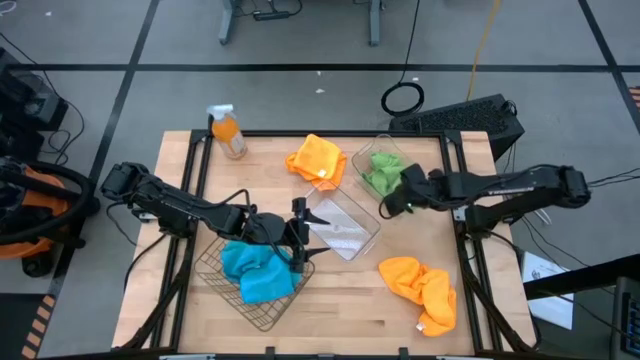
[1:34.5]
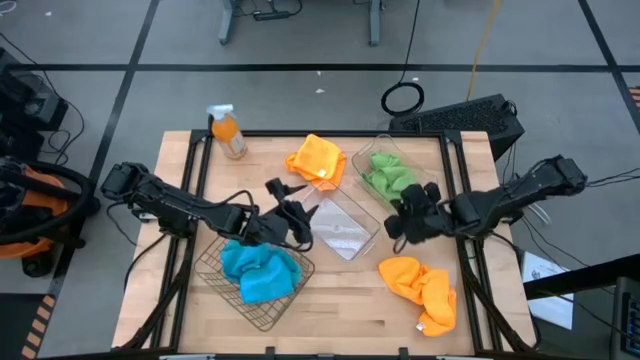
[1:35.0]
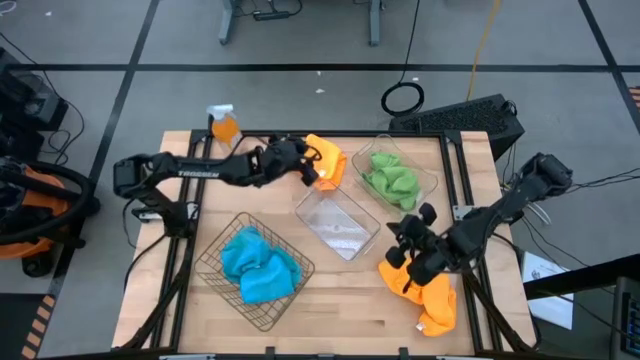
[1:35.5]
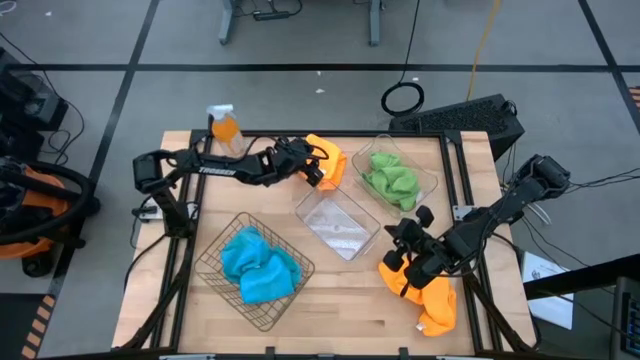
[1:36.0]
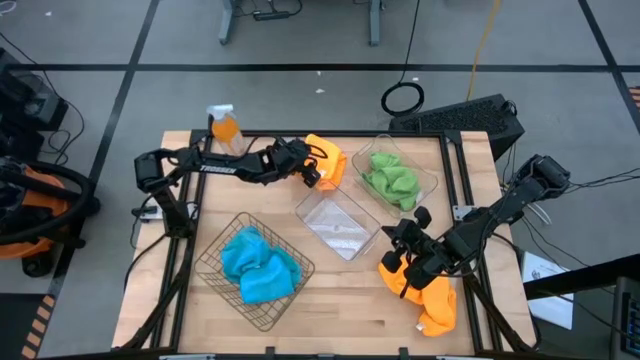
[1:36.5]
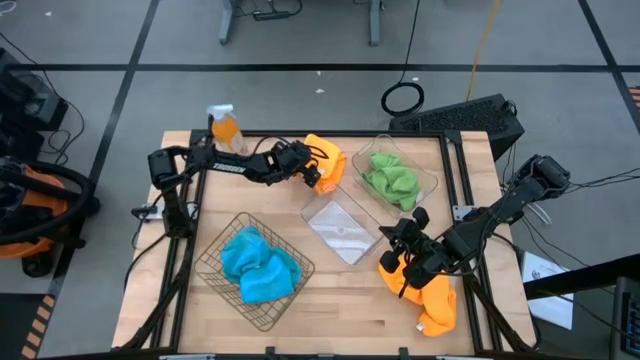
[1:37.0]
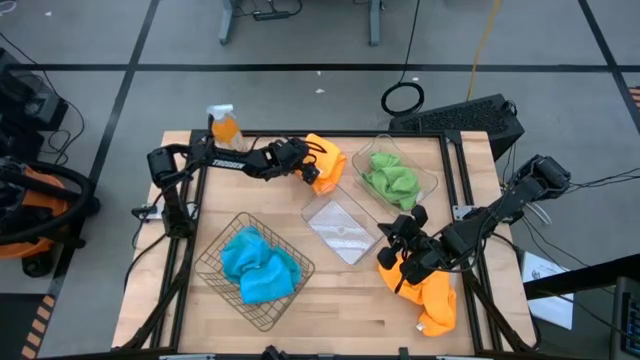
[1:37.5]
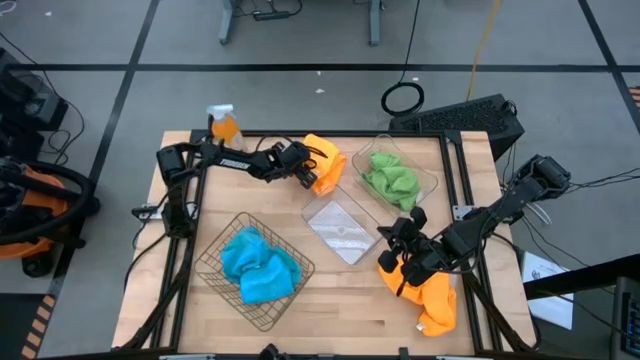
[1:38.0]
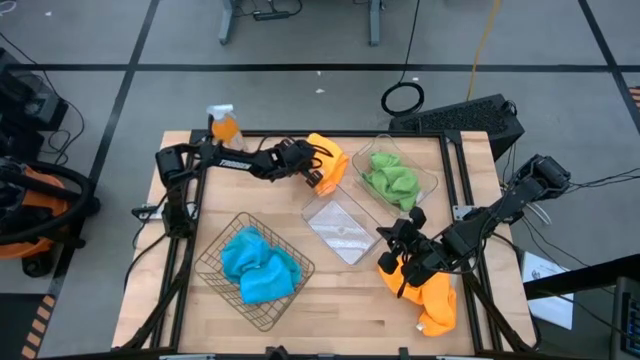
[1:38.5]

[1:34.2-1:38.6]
Task: Sort microfiber towel by color & place in baskets
Put the top orange microfiber towel into the bottom transparent bin

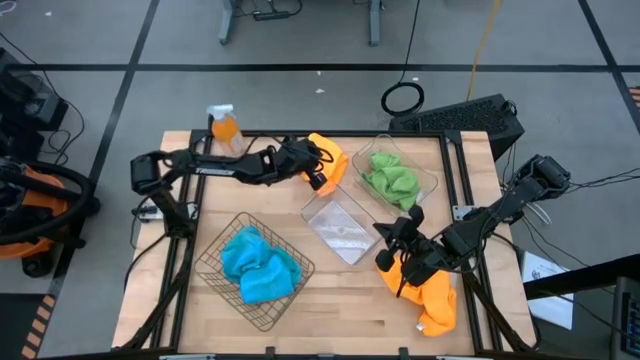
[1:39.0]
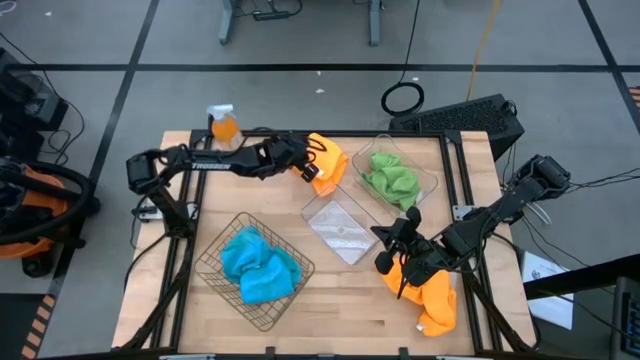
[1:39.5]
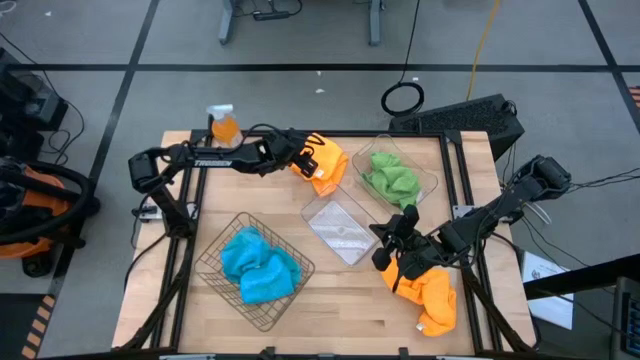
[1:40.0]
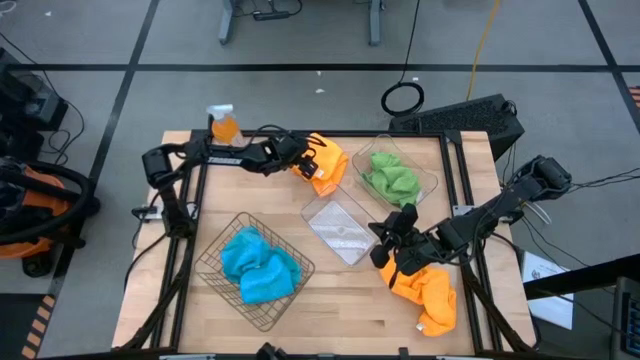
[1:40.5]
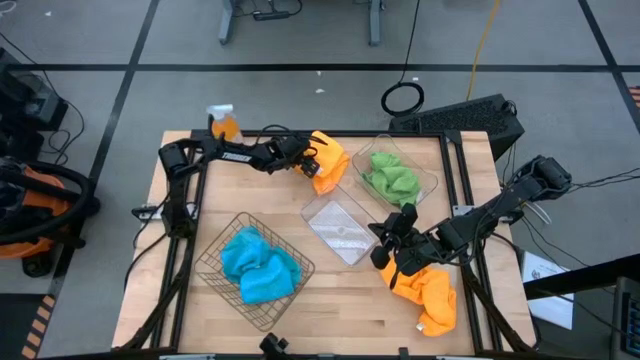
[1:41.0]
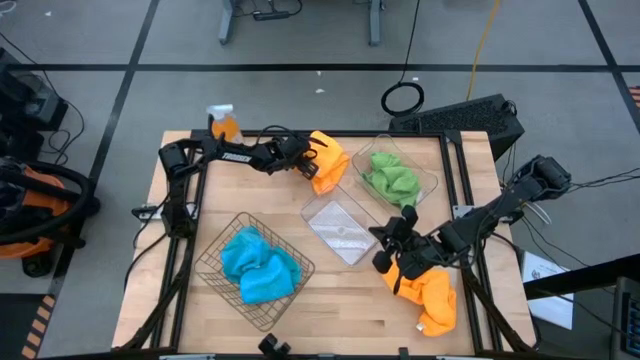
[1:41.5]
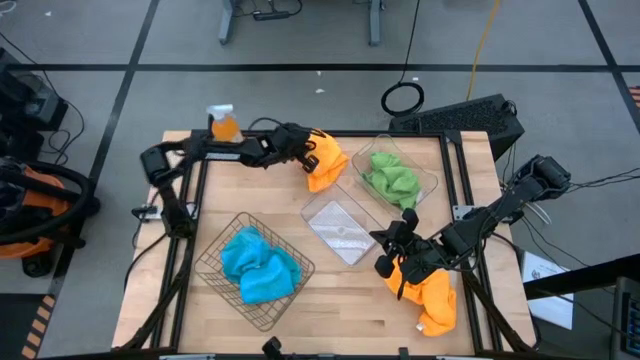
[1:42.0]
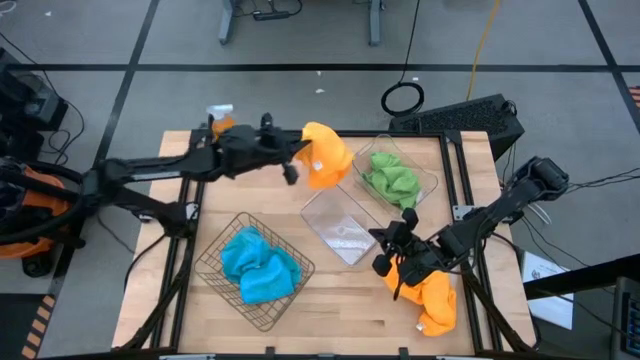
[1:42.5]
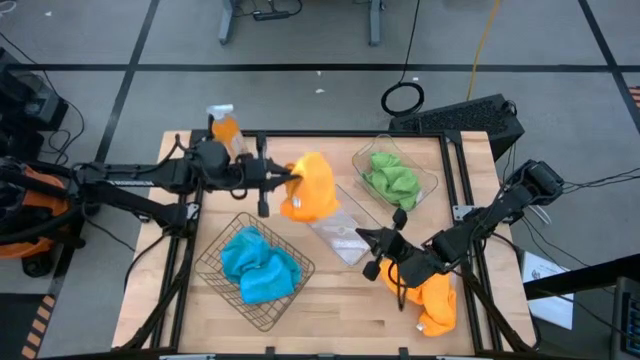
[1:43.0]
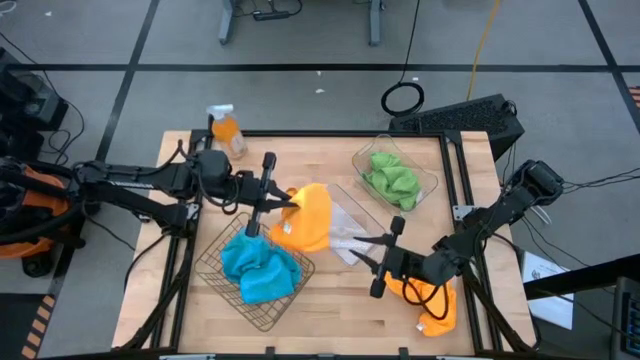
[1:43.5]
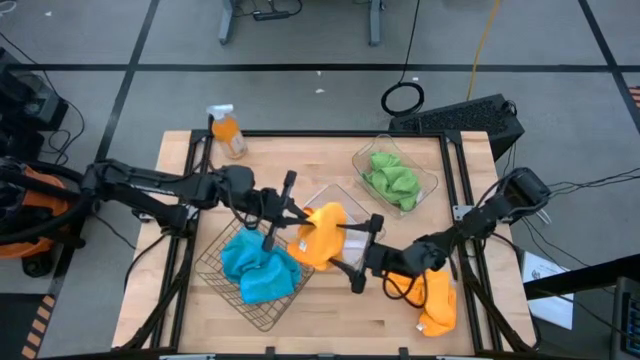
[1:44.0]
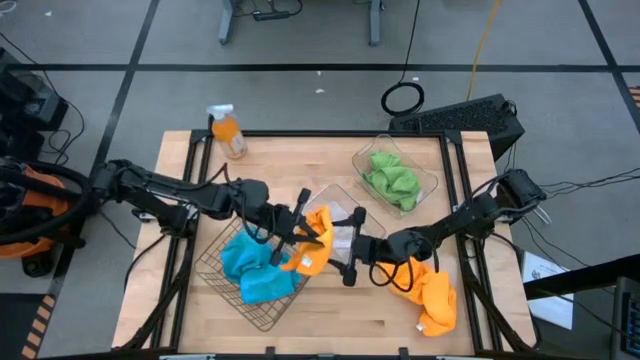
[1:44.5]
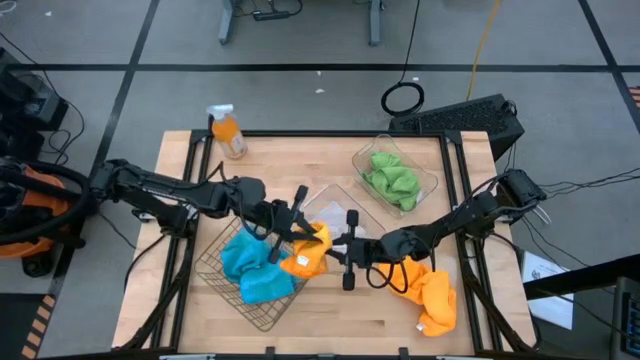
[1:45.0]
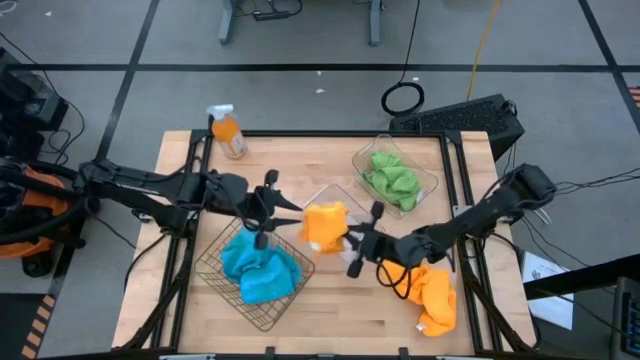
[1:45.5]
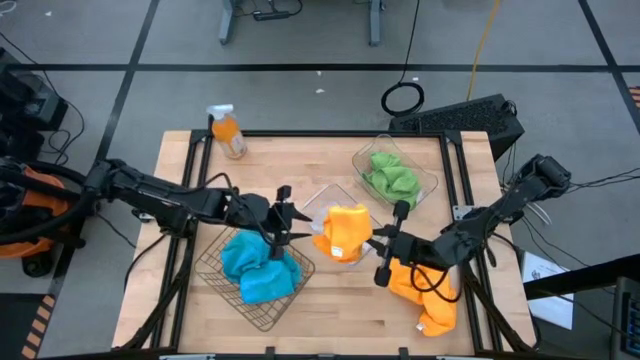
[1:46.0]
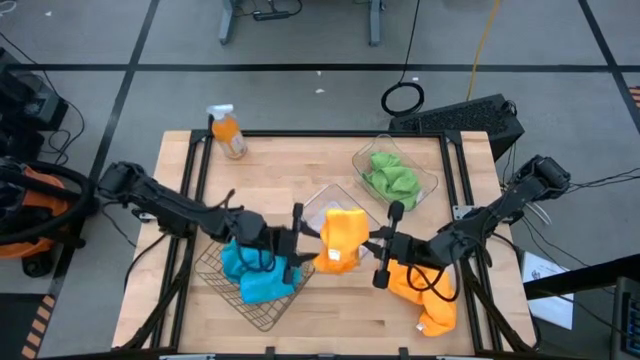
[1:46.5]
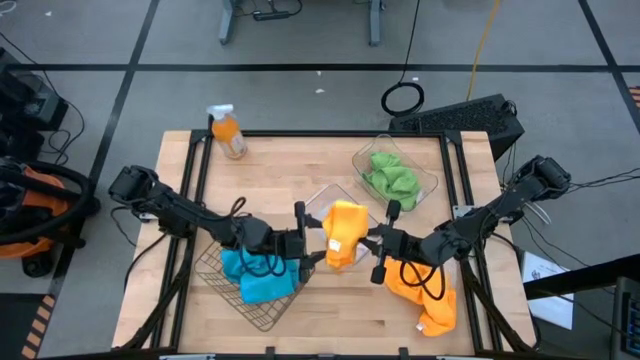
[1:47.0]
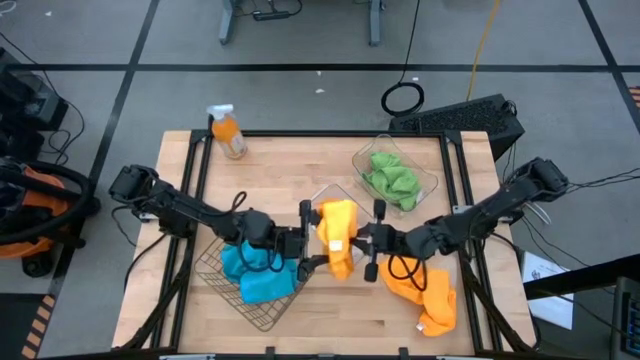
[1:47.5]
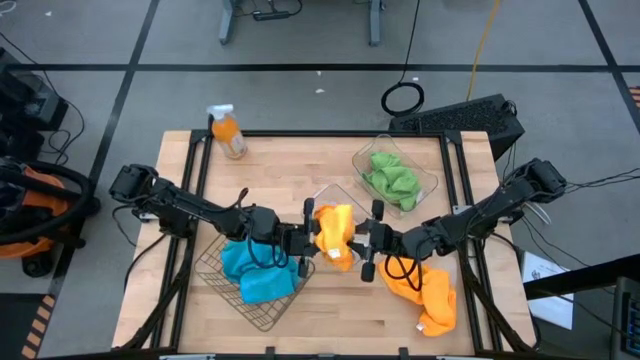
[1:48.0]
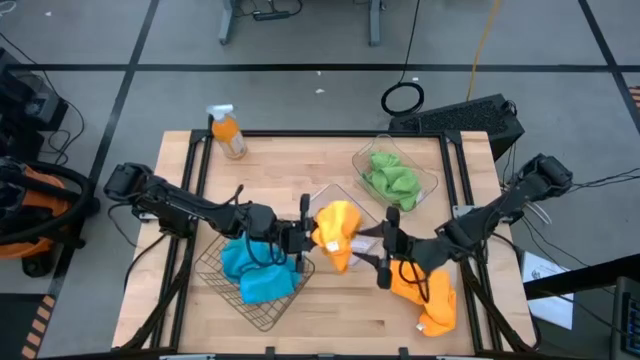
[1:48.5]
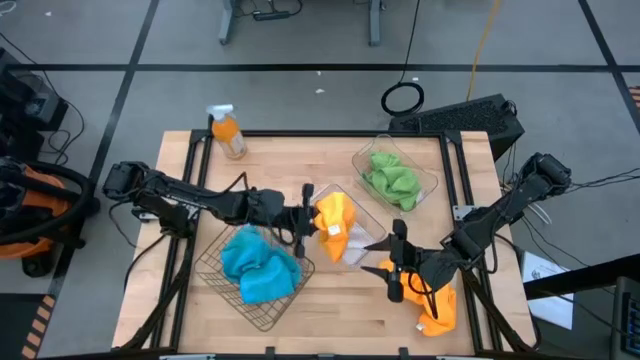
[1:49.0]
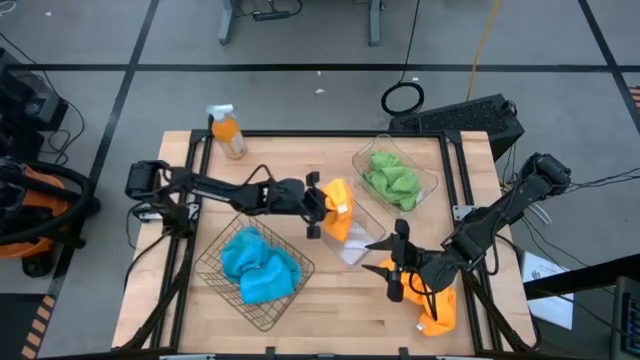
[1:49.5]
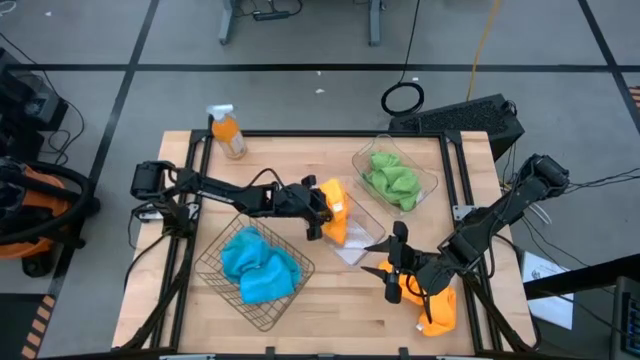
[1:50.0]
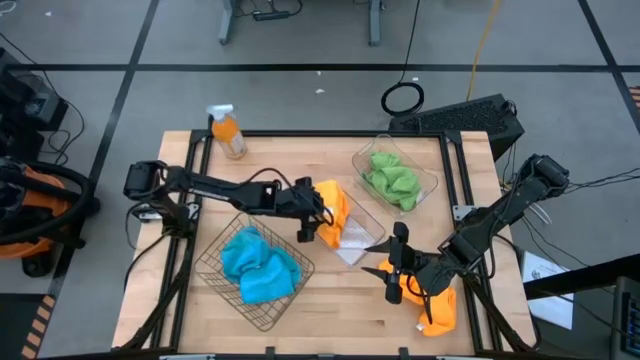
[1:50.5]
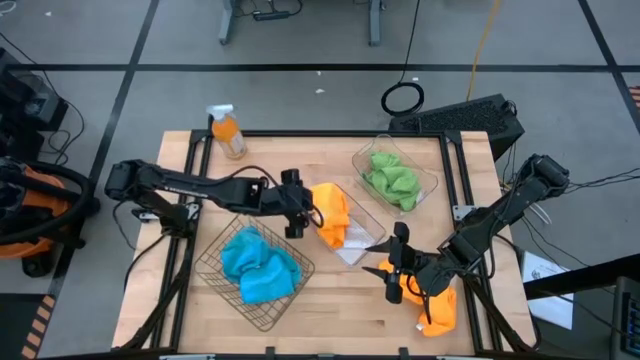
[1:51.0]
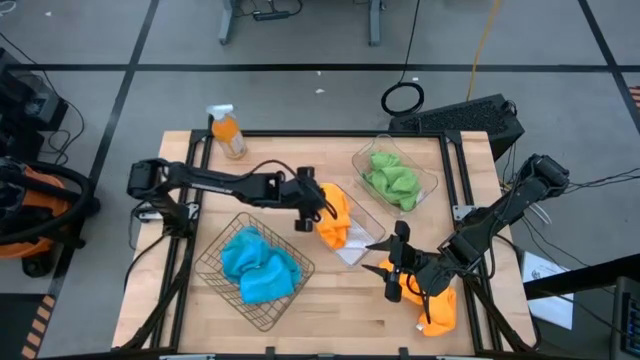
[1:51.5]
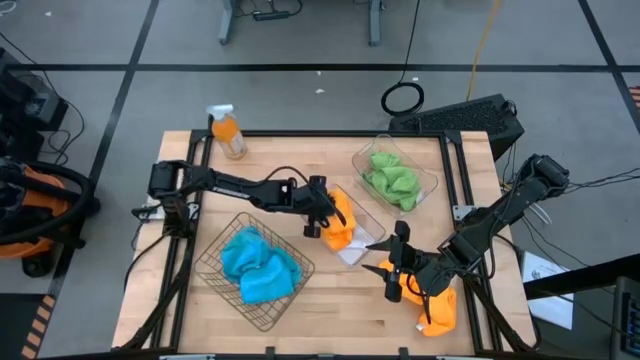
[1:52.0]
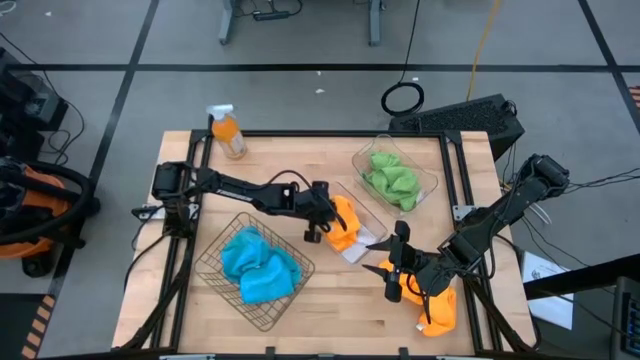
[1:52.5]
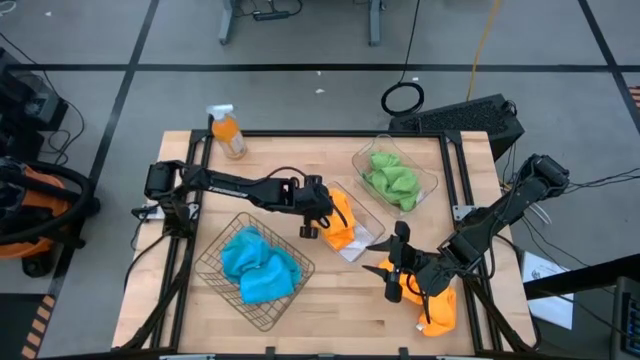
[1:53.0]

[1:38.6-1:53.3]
Put the top orange microfiber towel into the bottom transparent bin

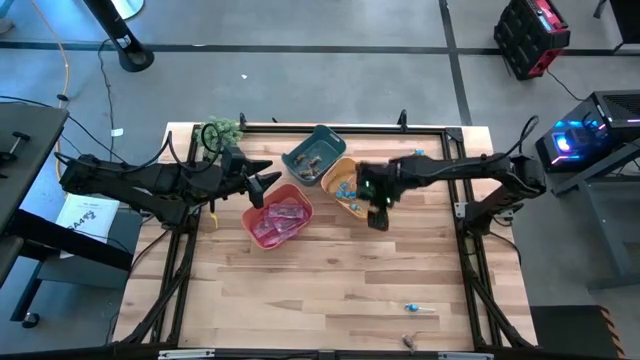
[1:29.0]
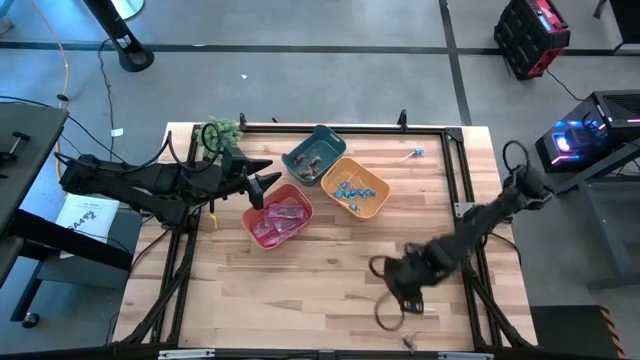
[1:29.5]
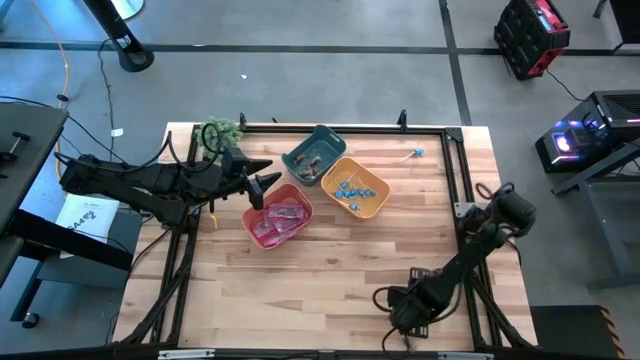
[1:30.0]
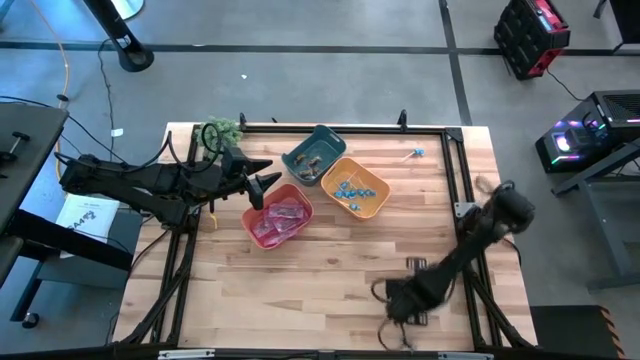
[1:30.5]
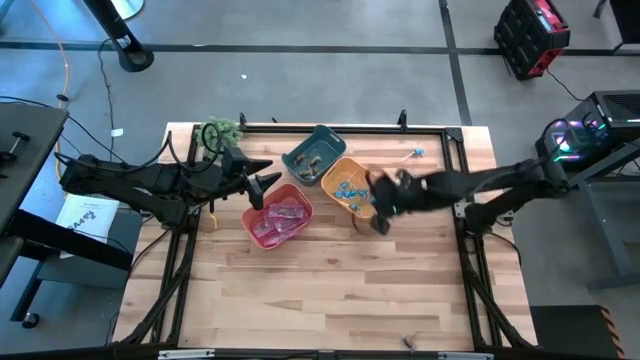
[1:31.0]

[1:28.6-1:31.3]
Task: Sort candy
Put the blue candy into the yellow bin
